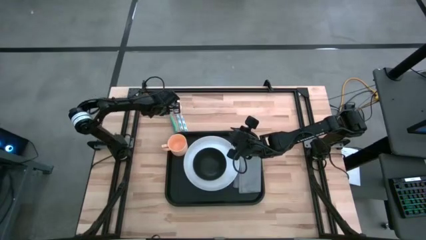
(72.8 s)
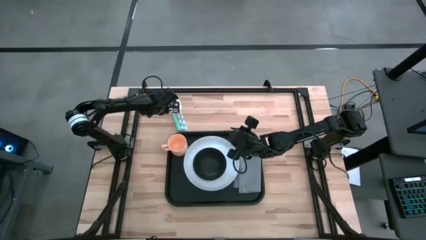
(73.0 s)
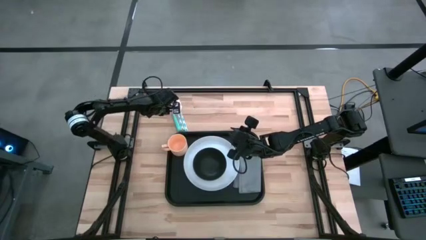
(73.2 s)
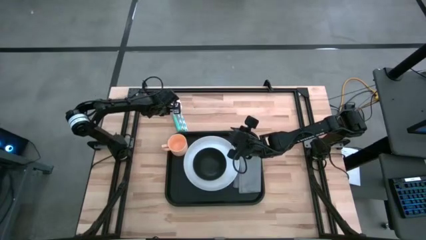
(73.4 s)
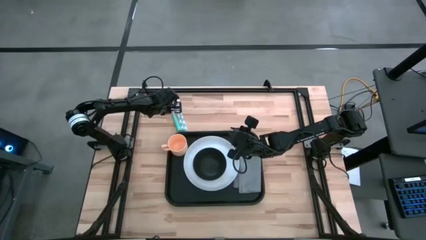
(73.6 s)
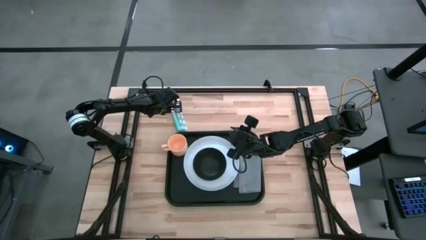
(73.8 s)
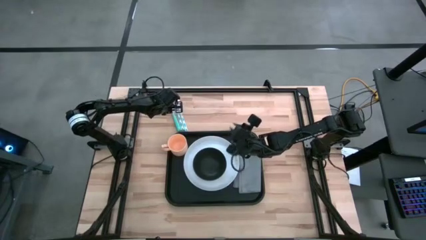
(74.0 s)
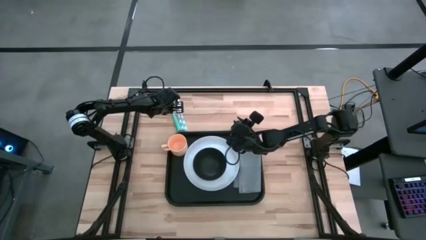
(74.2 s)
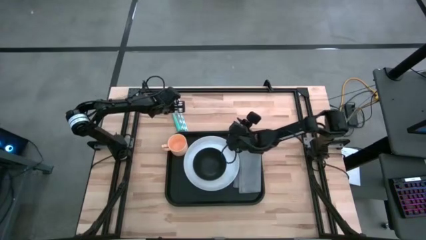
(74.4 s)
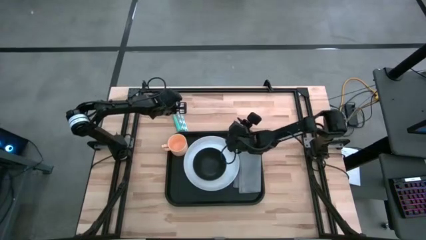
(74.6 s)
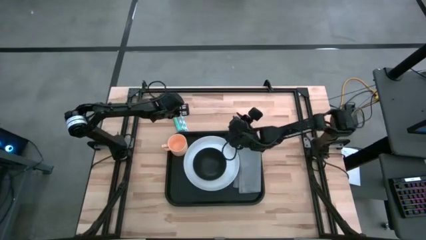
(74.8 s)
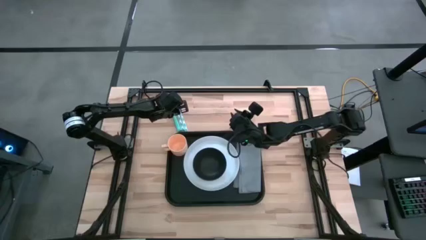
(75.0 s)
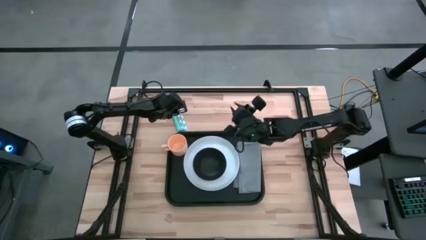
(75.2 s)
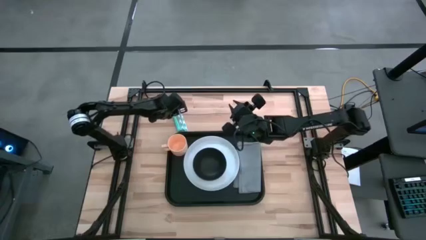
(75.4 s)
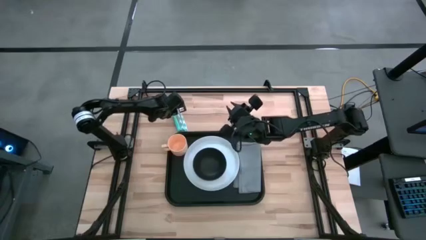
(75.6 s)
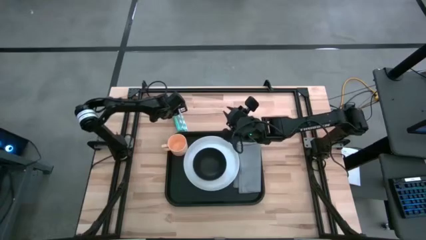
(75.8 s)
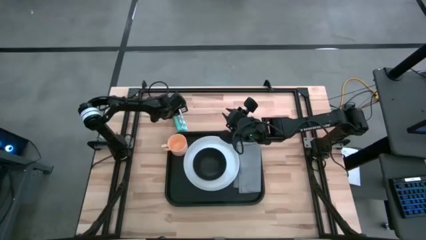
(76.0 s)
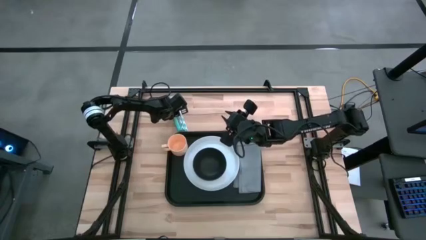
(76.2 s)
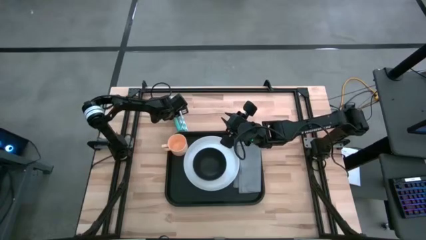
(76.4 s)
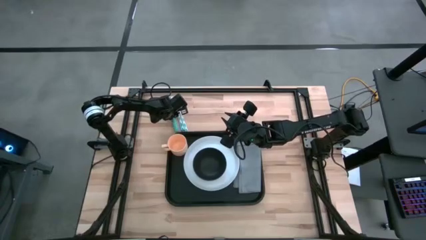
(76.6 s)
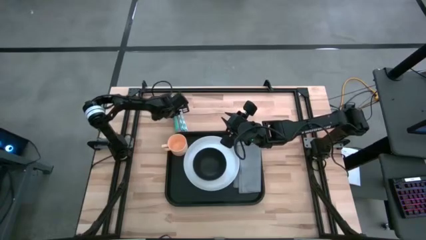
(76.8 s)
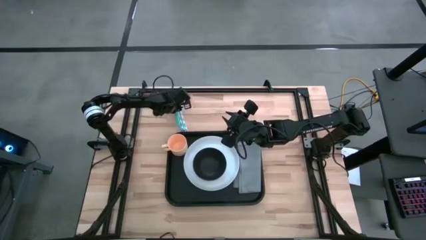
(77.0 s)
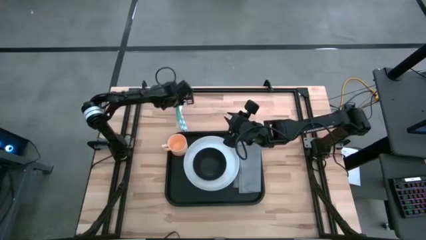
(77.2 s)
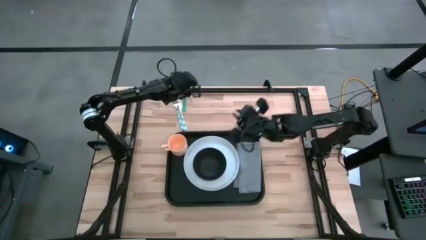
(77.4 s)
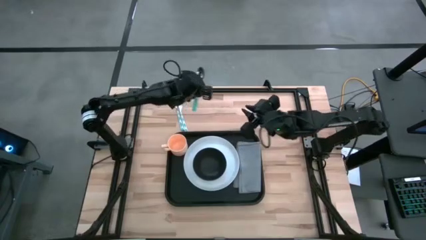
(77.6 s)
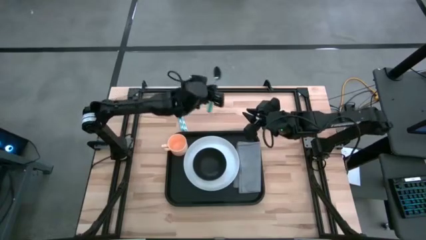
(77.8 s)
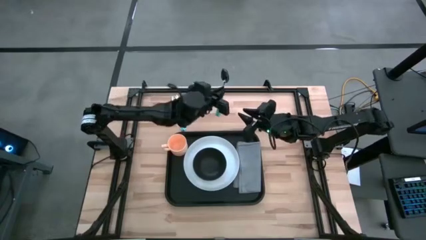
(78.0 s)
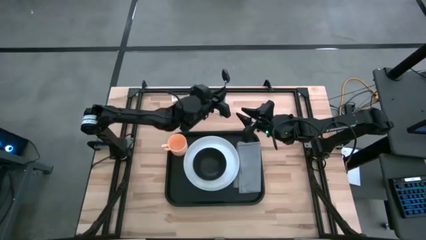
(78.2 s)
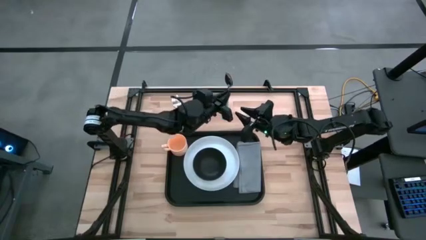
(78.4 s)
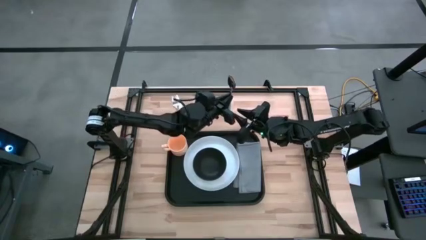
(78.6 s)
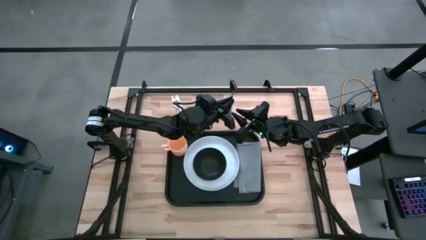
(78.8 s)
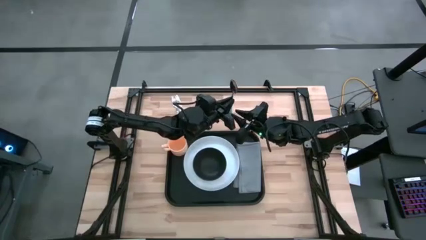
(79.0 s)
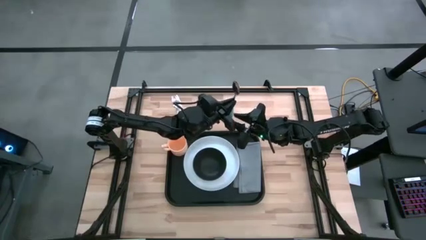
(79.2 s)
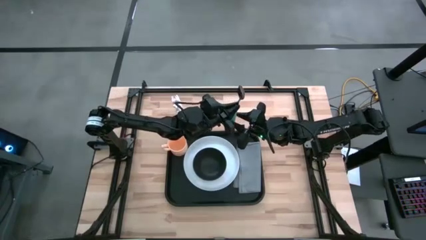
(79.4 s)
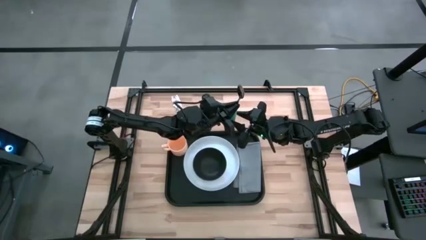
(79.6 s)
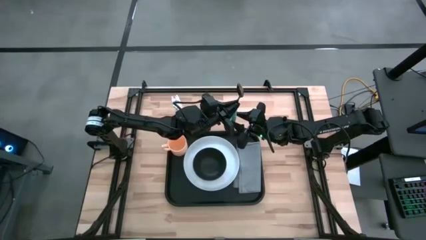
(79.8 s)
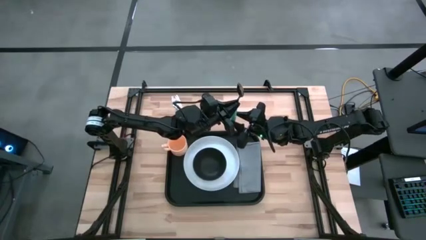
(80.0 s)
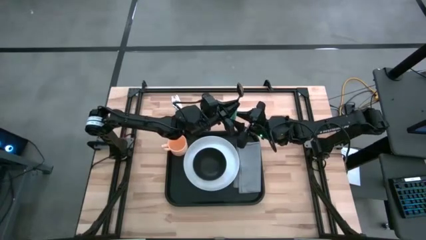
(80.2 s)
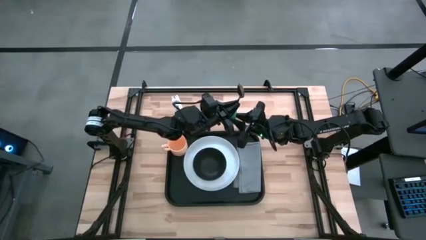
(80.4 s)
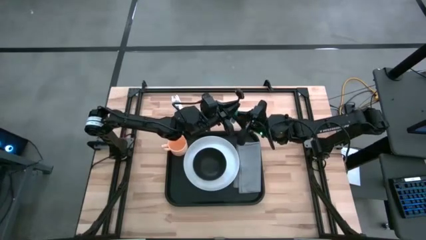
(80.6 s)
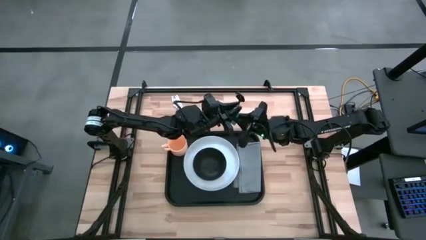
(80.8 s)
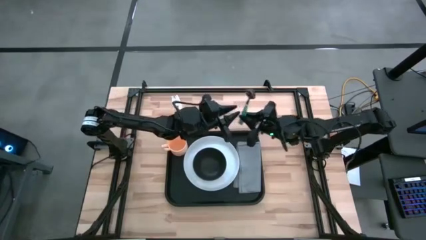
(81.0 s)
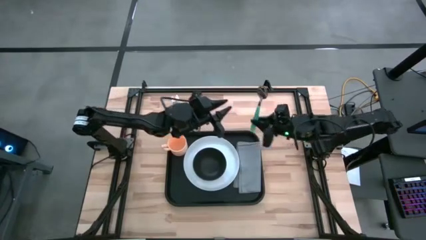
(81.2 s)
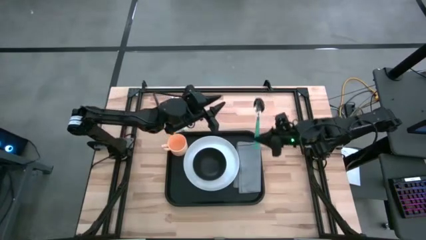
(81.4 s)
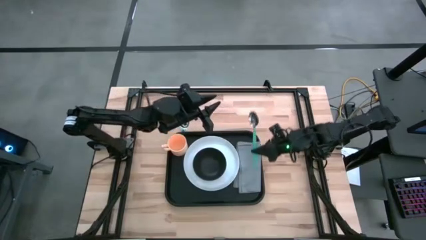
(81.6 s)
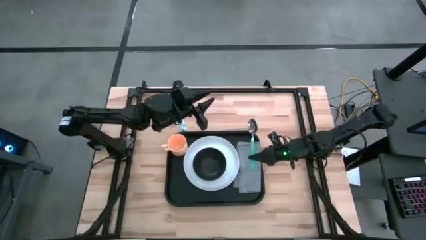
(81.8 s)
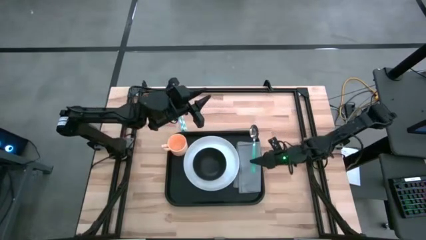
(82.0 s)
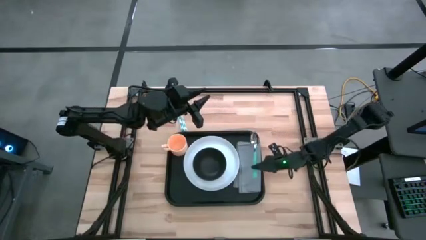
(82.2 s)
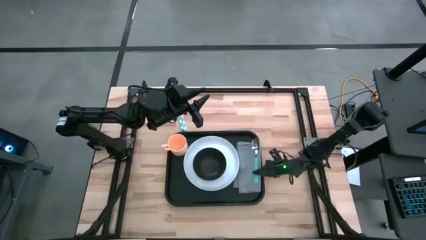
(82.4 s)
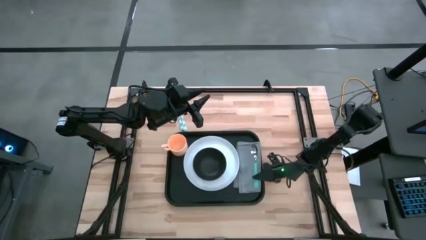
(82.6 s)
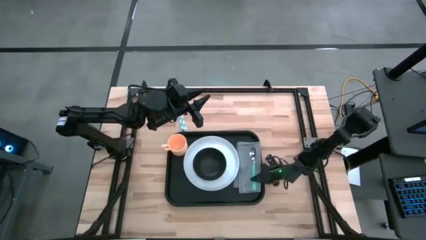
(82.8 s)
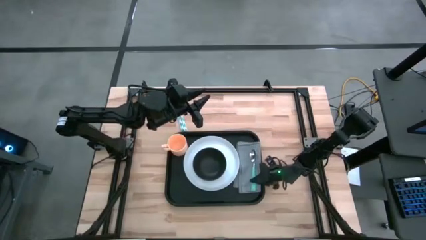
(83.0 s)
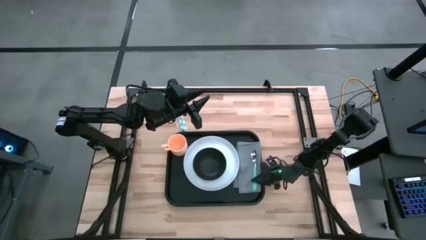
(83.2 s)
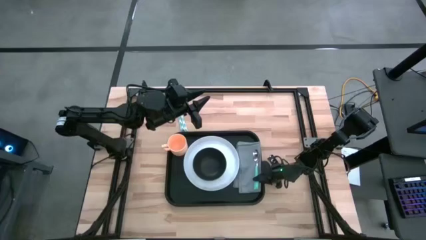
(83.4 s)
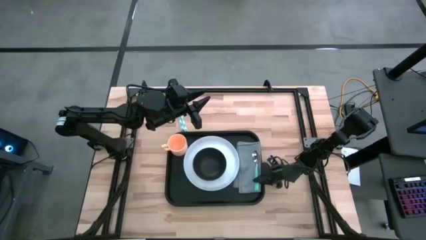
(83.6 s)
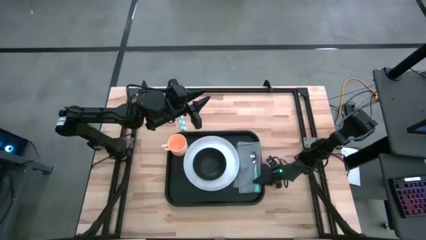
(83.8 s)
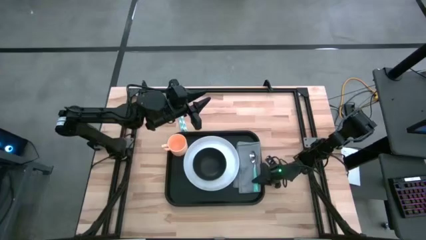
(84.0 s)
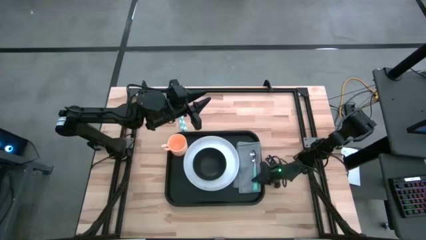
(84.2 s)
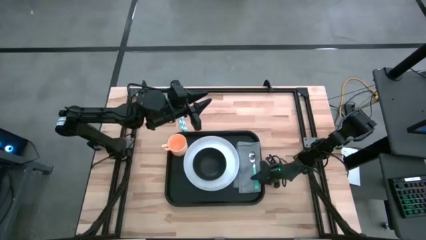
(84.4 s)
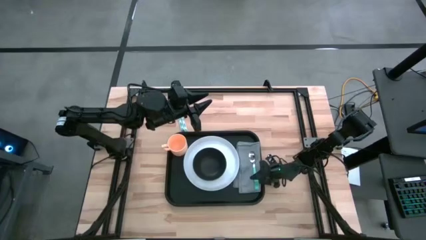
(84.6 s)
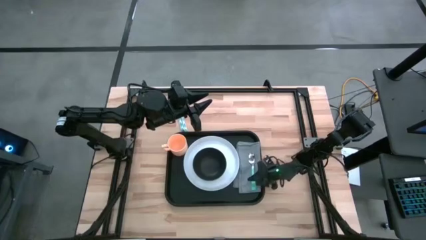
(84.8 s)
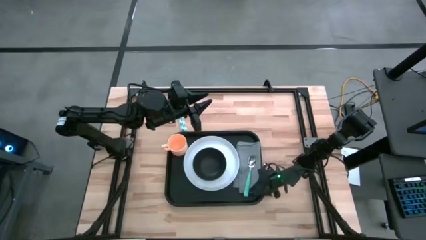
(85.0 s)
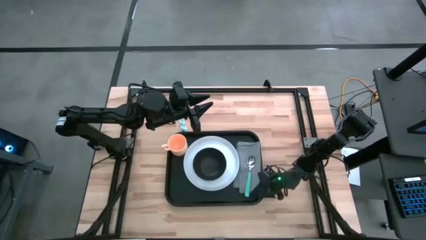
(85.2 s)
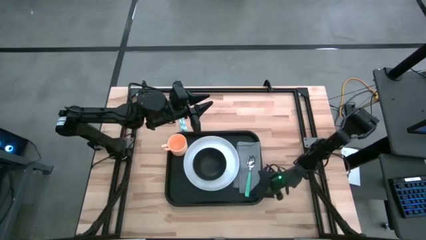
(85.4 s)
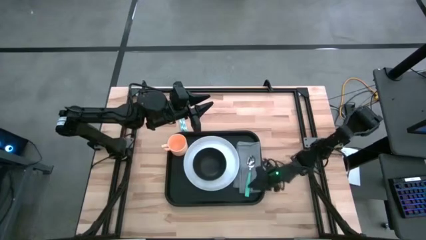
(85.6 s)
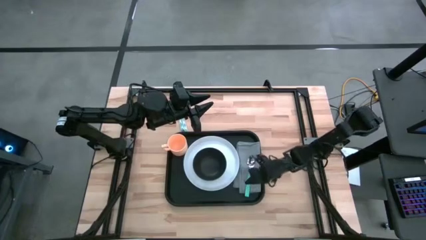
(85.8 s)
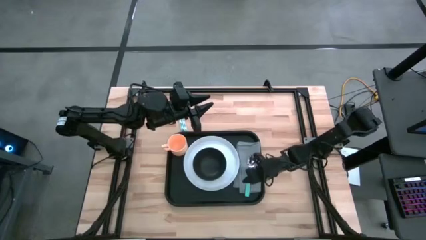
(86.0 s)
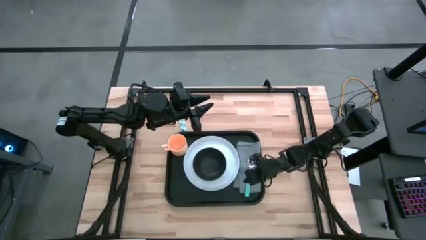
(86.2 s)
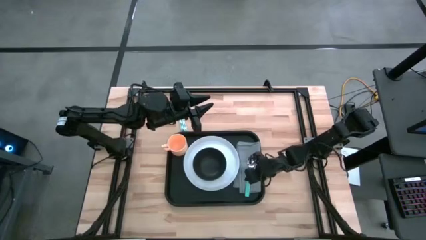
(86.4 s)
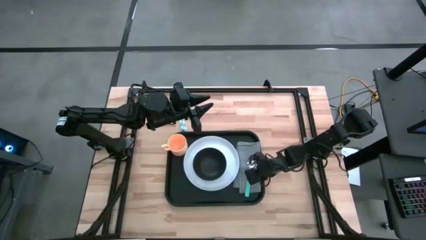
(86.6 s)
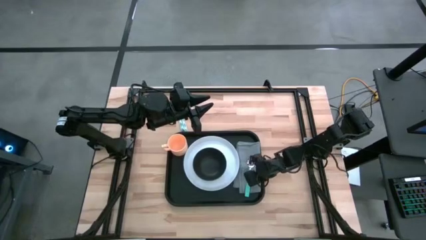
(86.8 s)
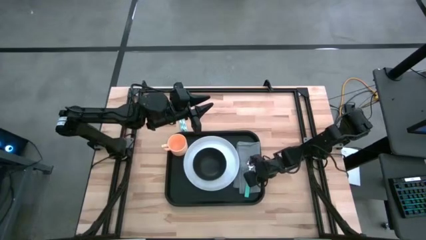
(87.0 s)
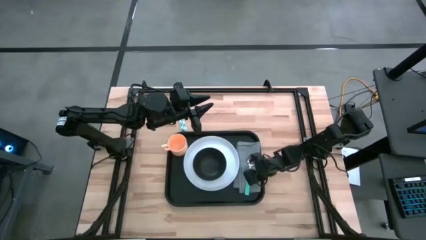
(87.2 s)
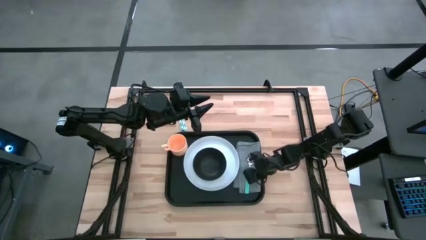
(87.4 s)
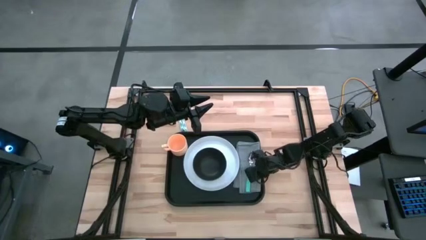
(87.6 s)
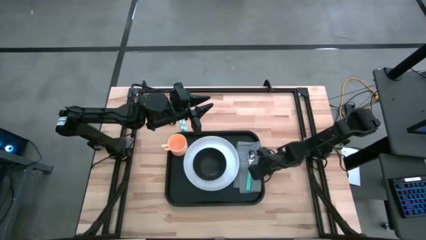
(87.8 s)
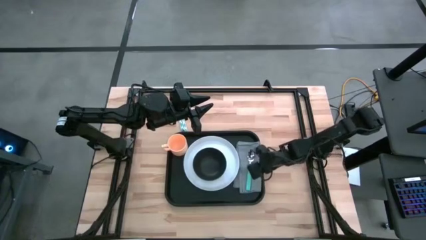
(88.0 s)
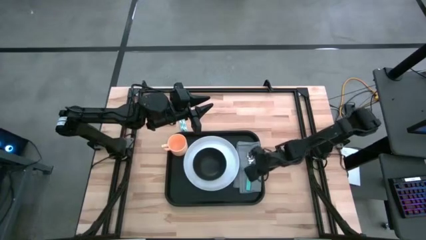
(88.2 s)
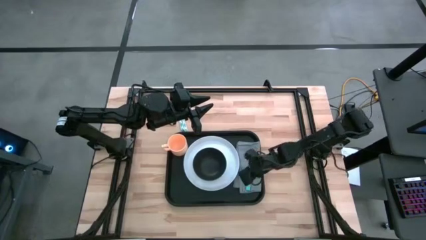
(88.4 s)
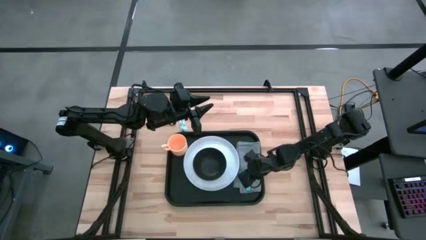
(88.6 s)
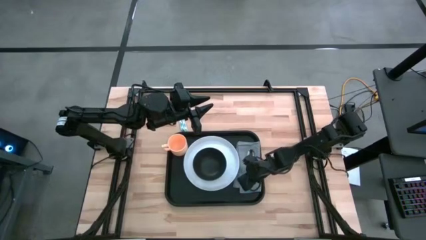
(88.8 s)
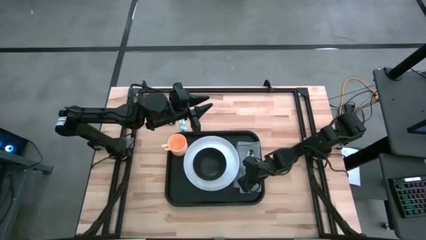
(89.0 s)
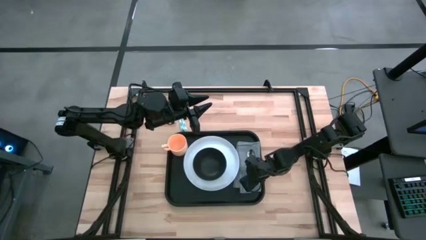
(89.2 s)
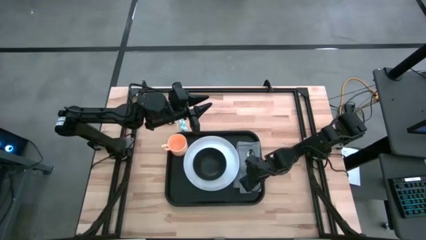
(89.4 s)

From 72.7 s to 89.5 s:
Task: Set up tray
Put the green spoon on the gray napkin
